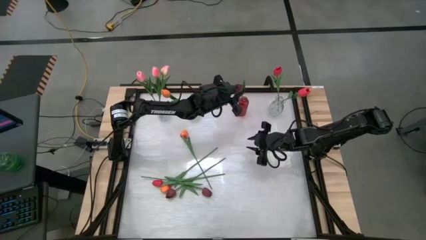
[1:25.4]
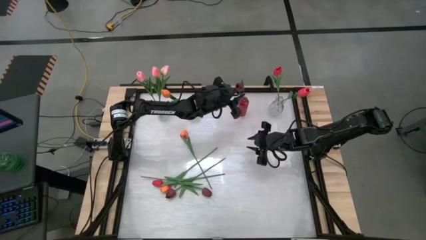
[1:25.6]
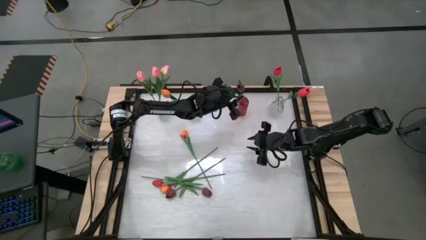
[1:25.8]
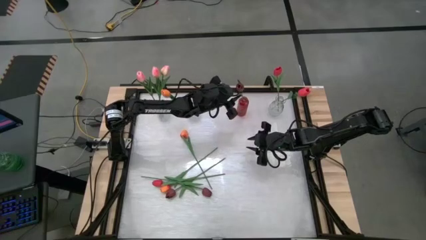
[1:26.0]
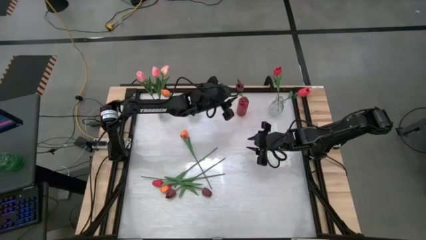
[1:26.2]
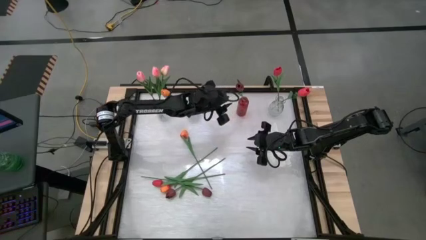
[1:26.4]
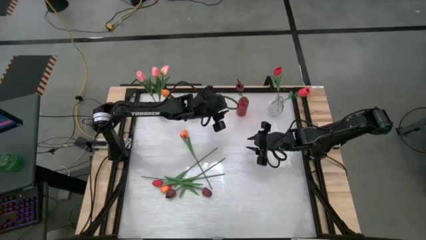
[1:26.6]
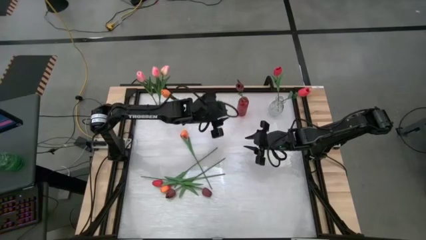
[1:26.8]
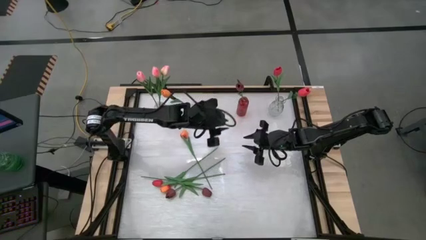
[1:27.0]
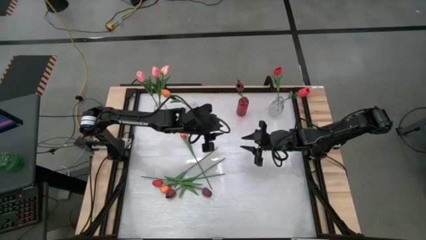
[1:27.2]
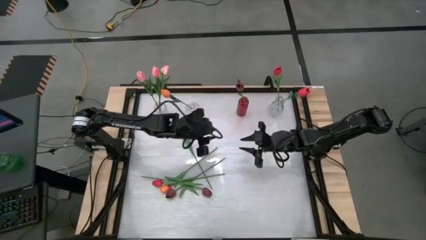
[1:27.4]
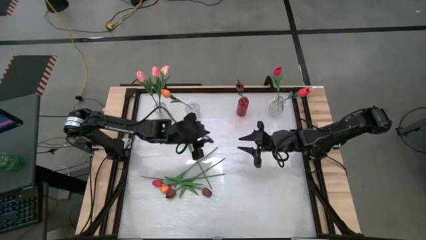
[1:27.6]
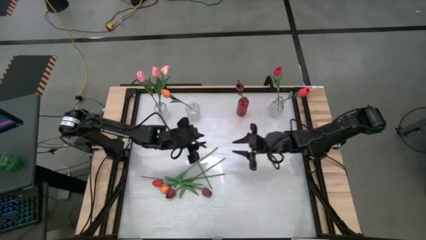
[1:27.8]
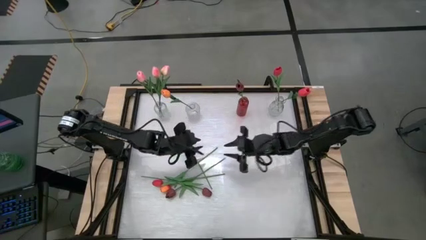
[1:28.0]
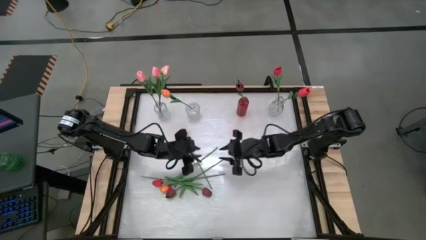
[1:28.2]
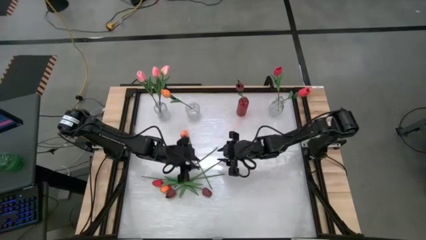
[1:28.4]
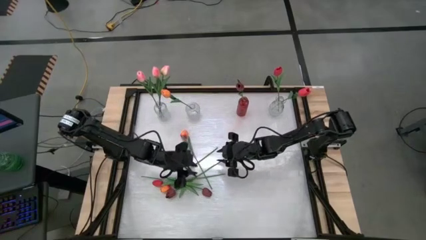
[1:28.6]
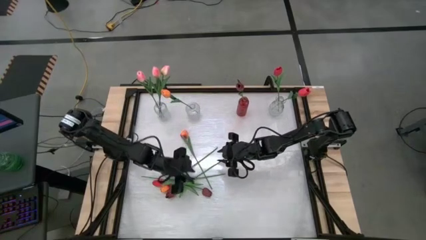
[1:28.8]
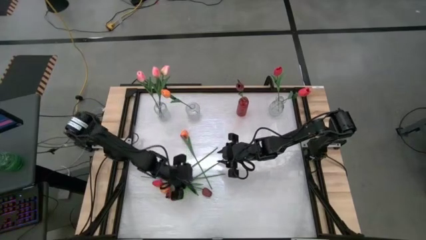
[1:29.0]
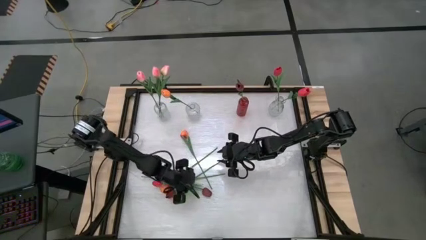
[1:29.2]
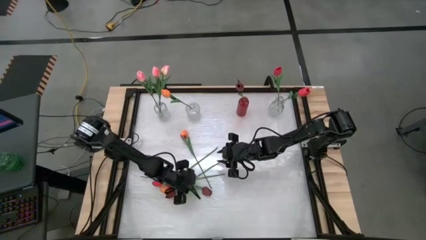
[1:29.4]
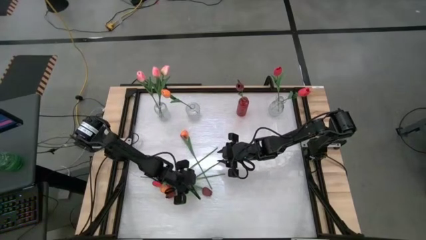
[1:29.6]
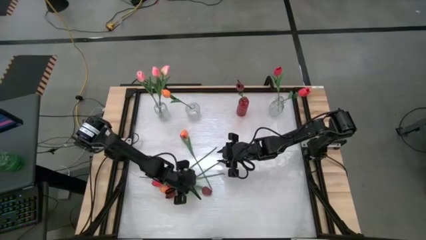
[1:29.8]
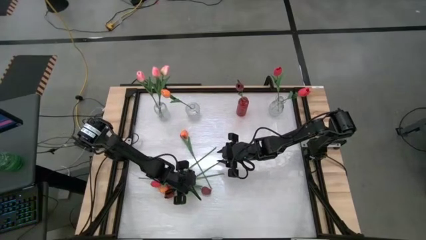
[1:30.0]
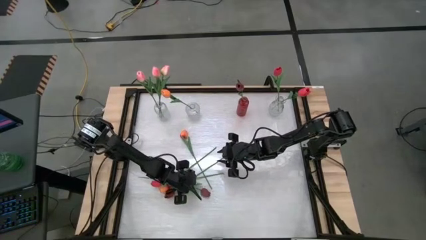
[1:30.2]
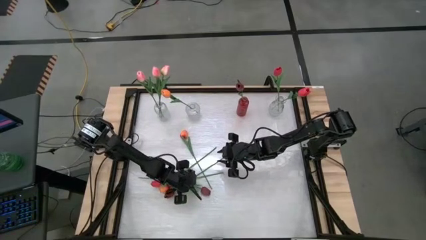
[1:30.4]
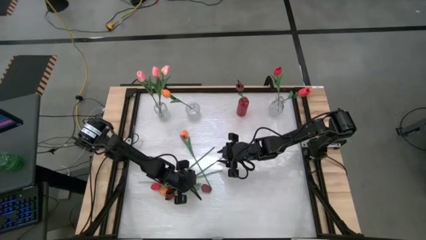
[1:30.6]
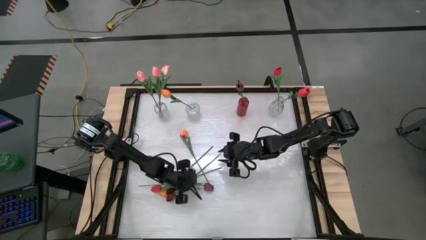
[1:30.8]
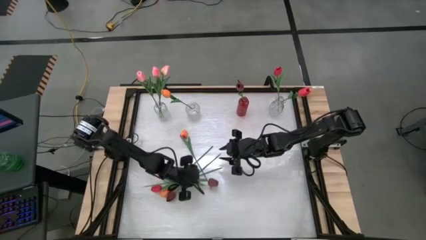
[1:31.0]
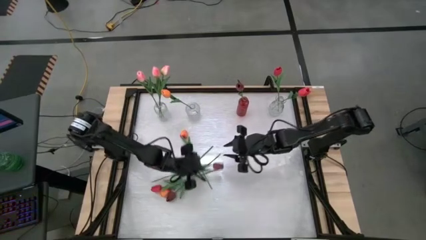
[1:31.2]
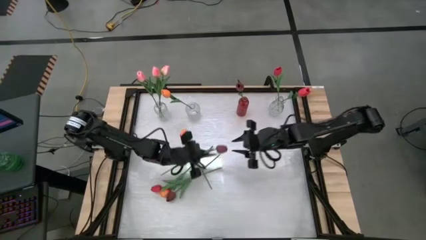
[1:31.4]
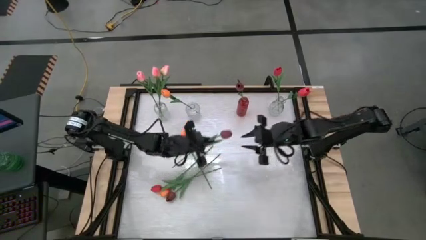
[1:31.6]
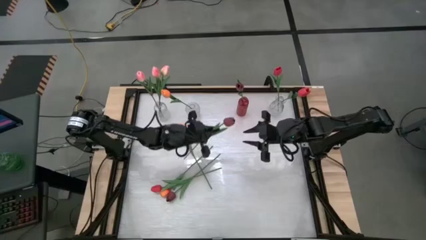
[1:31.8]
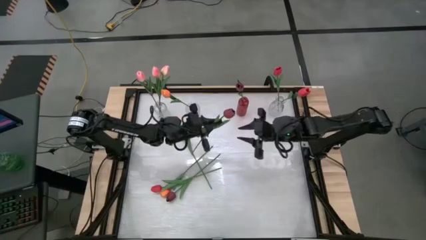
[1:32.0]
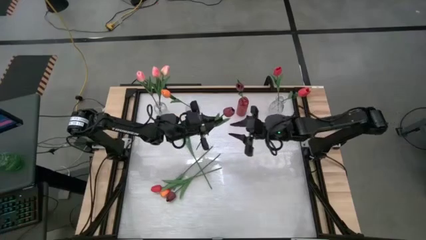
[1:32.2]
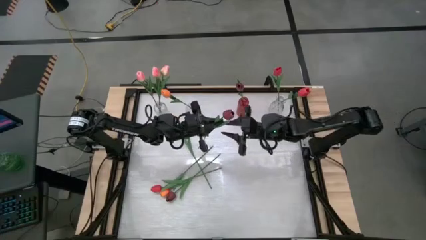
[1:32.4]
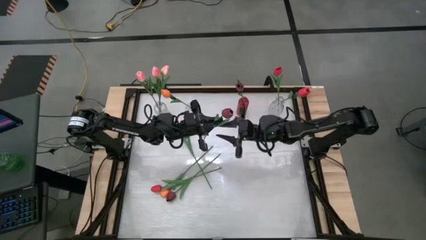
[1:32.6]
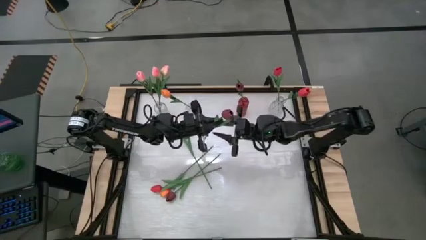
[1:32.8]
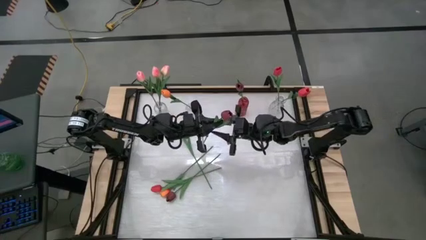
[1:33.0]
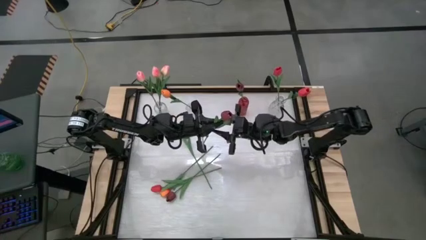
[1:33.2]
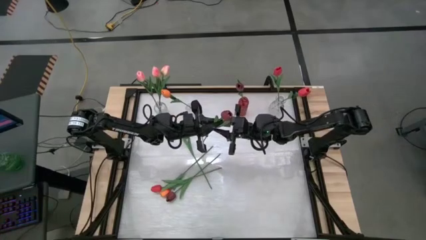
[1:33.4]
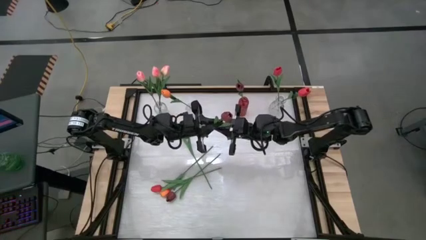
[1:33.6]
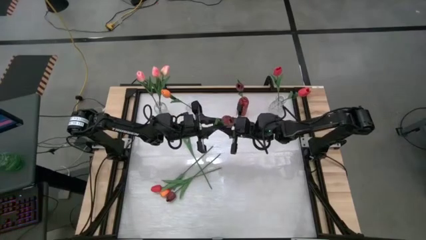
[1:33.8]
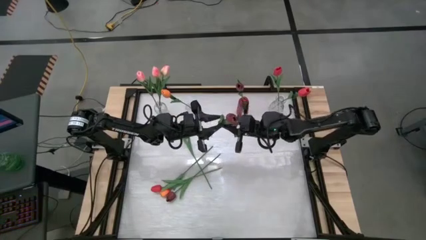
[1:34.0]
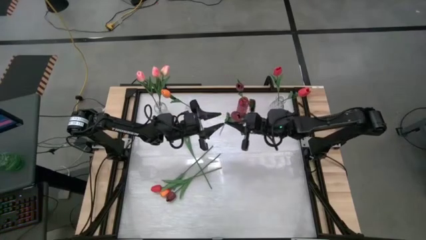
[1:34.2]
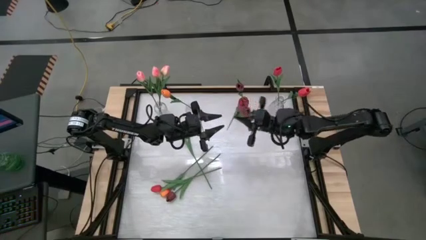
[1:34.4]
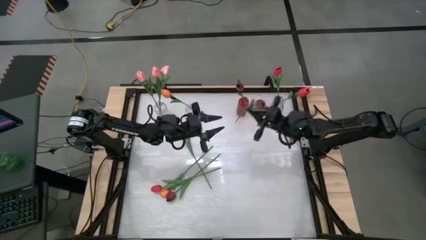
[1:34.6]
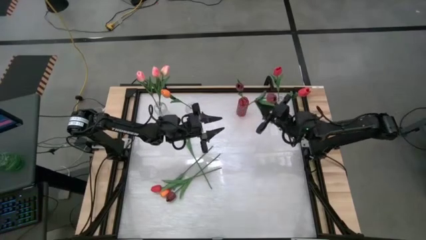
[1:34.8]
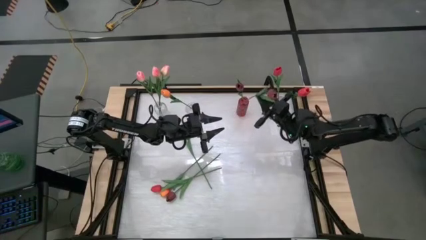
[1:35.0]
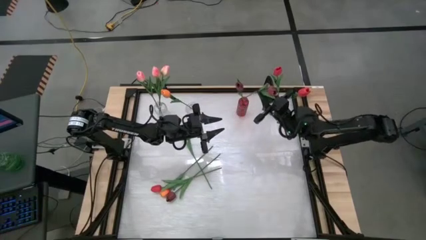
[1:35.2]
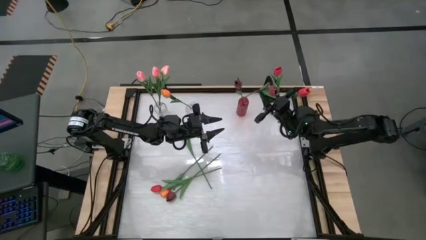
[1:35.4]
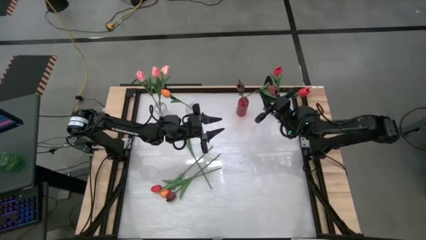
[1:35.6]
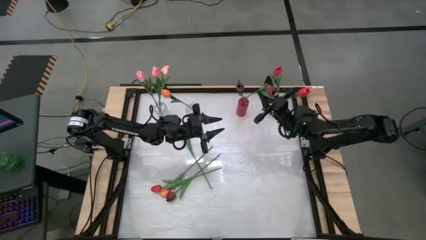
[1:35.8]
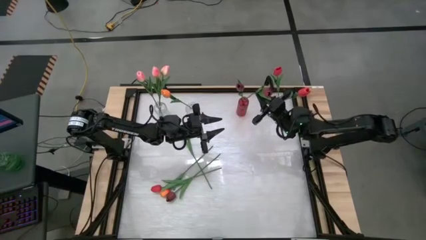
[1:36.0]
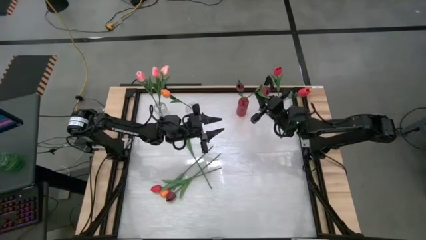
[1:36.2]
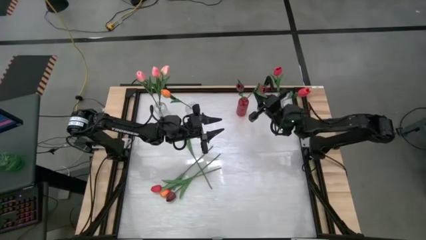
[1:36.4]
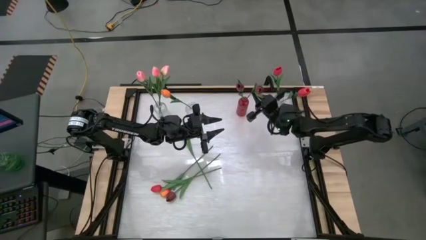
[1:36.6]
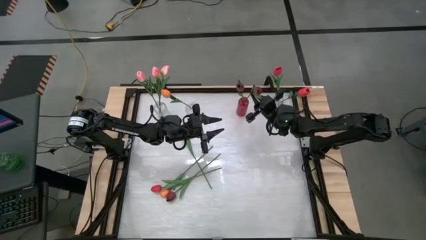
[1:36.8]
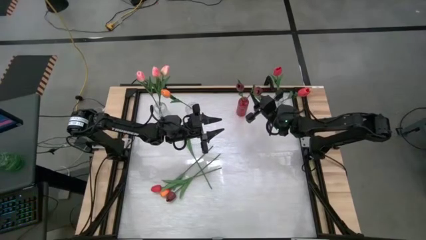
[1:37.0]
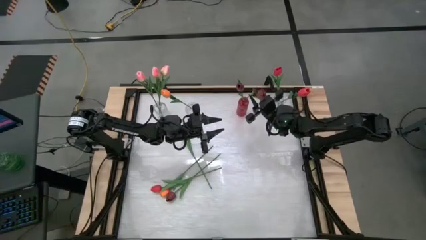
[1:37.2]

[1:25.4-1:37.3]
Task: Sort flowers into vase by color
Put the red flower into the red vase

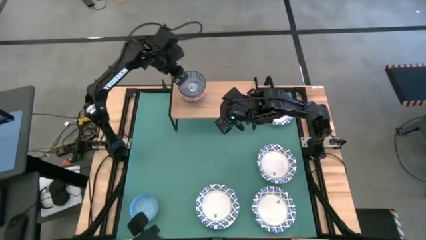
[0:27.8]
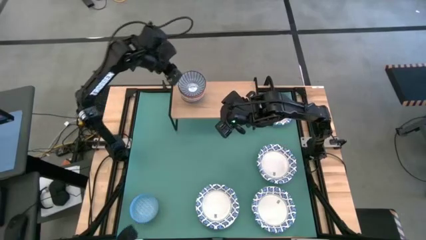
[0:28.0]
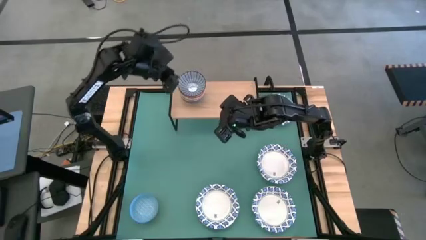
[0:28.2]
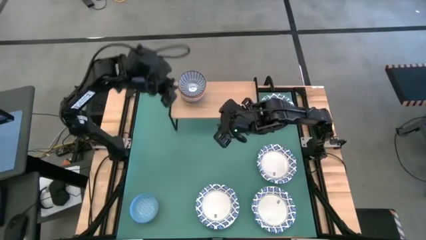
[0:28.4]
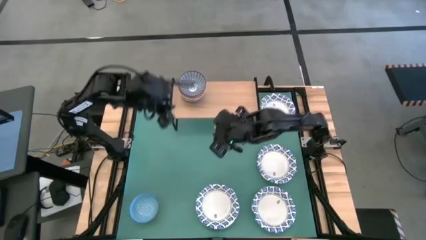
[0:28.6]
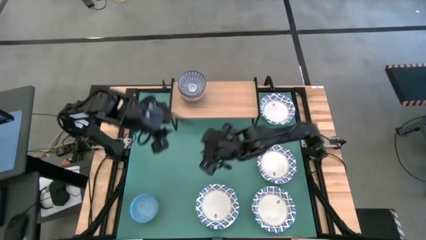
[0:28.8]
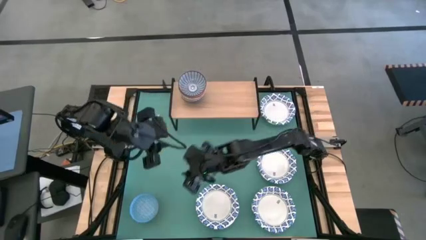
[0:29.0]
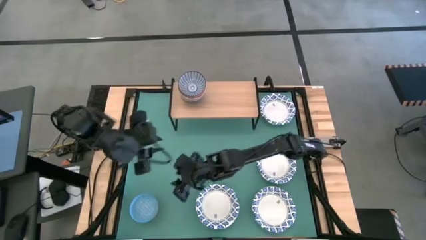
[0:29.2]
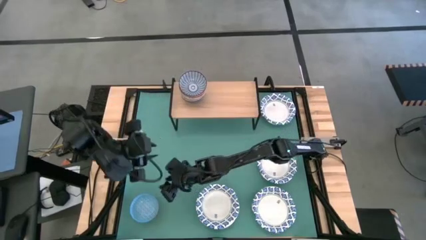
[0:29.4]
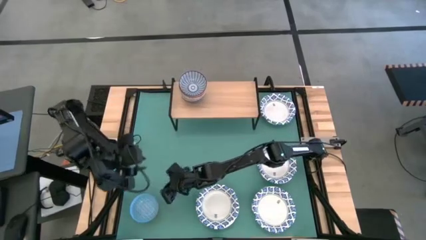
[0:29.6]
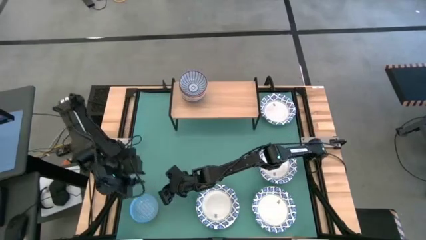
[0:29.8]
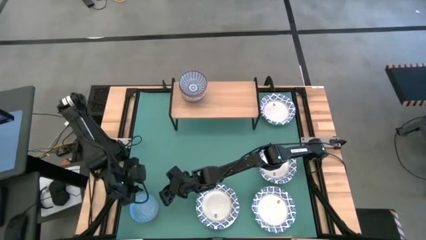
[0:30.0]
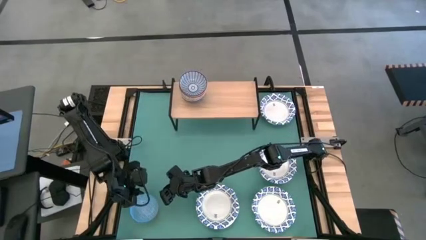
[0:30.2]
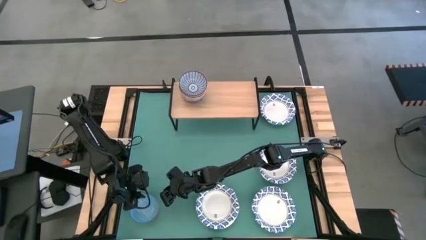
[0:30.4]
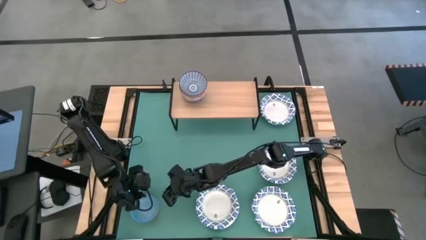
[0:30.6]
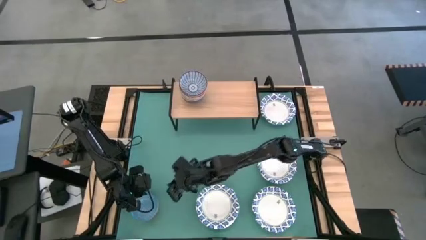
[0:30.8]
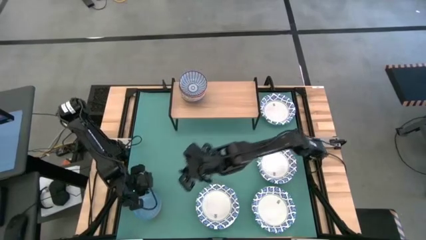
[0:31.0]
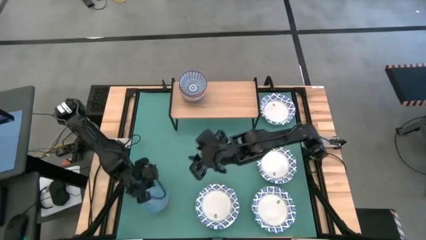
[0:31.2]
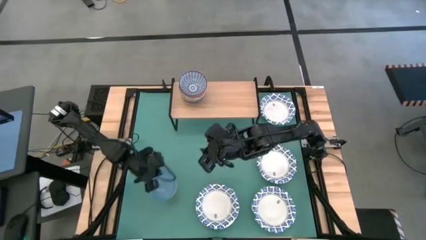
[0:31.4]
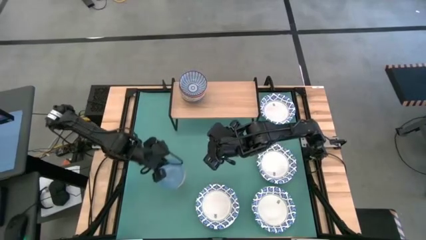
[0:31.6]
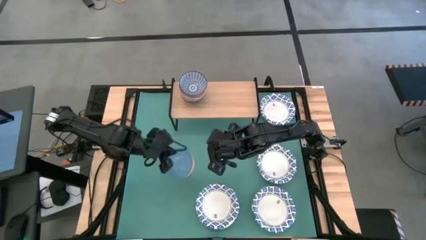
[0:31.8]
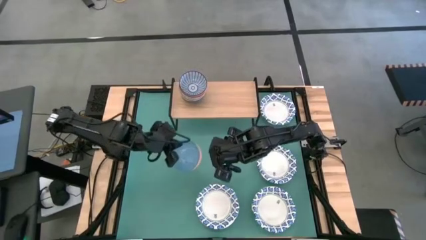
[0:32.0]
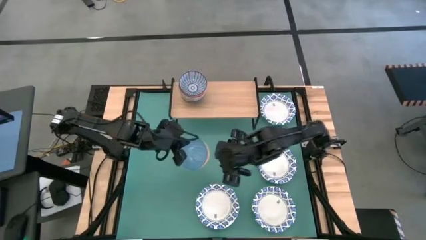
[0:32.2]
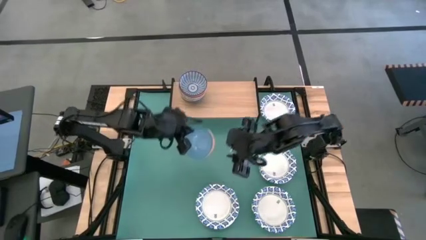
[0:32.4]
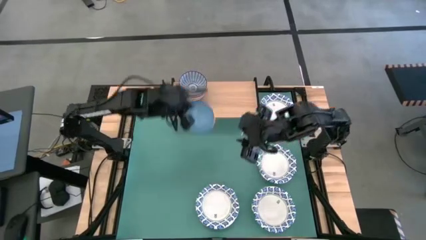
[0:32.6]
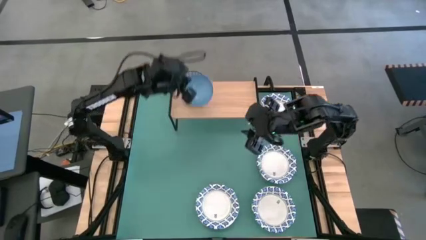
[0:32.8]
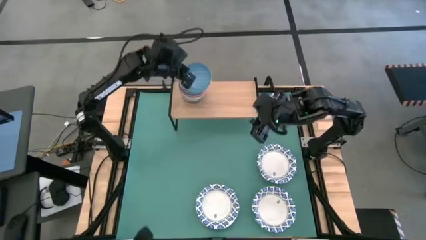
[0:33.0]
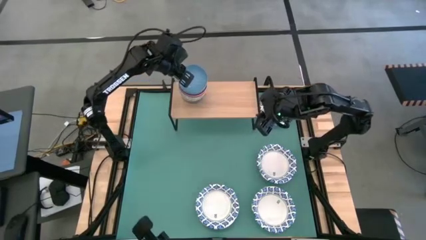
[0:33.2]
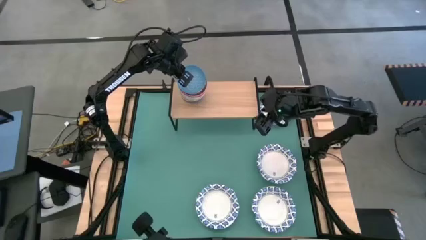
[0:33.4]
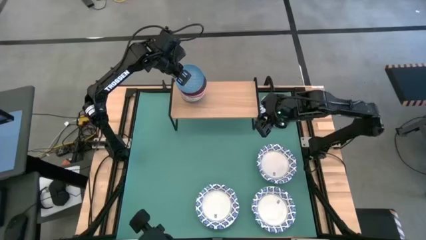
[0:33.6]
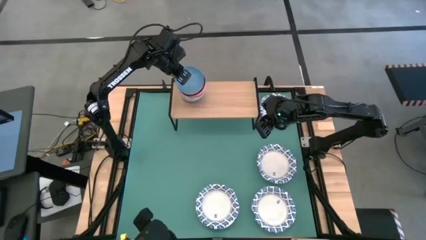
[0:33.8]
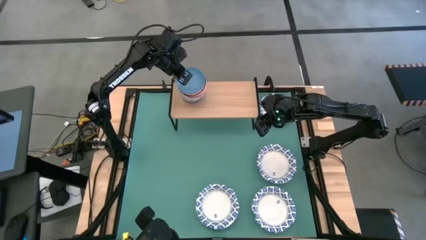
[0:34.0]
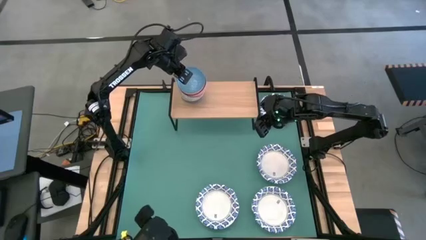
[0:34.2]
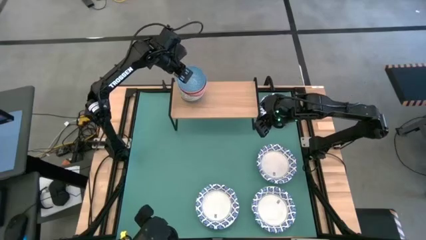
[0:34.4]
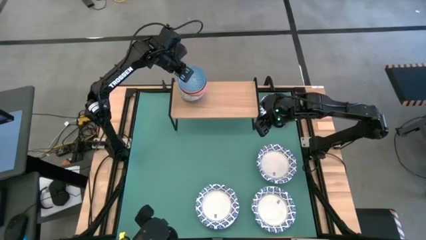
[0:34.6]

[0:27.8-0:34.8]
Task: Place and stack bowls onto a shelf
Stack the blue bowl on top of the dark blue bowl on the shelf
